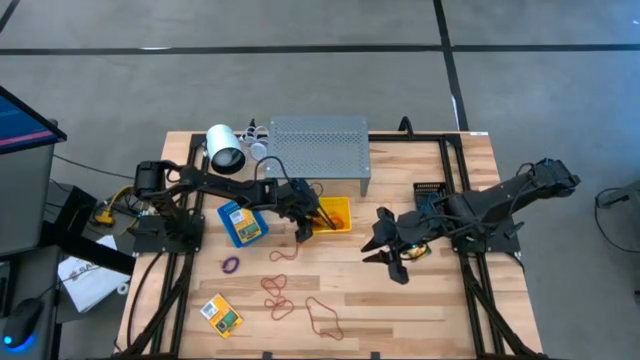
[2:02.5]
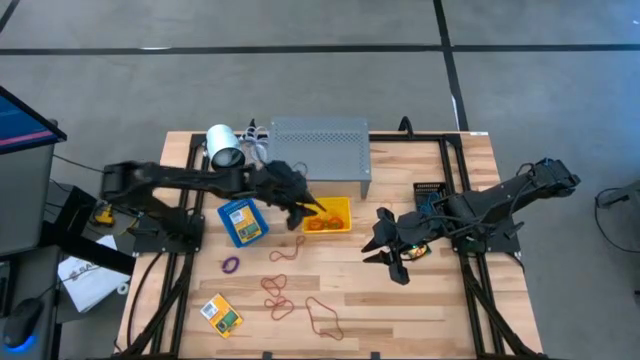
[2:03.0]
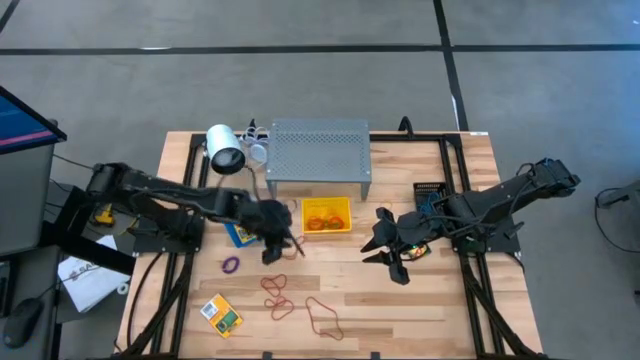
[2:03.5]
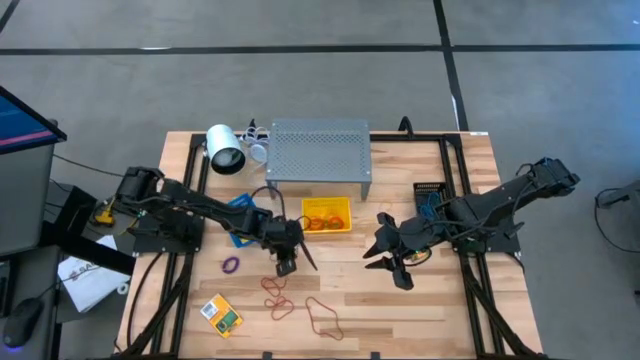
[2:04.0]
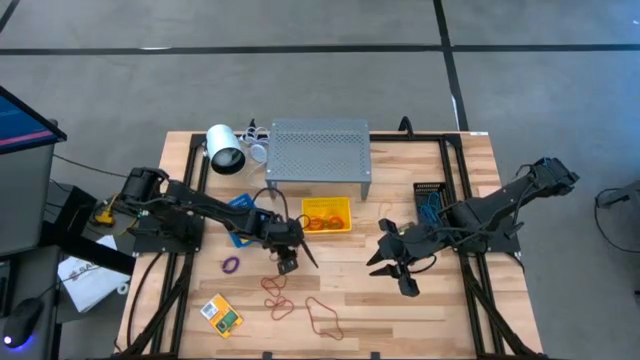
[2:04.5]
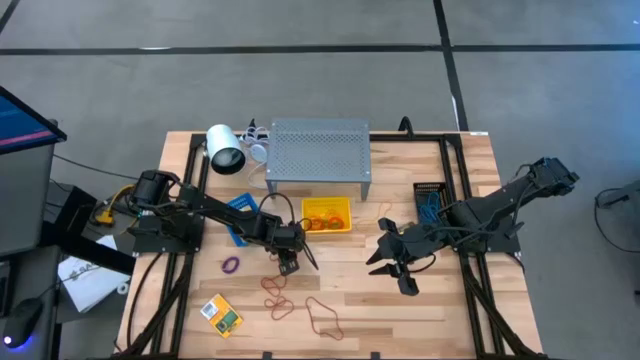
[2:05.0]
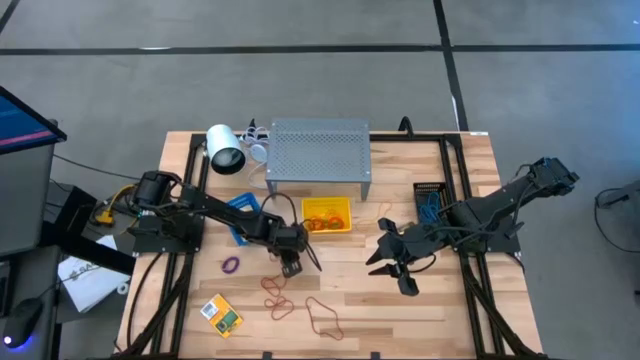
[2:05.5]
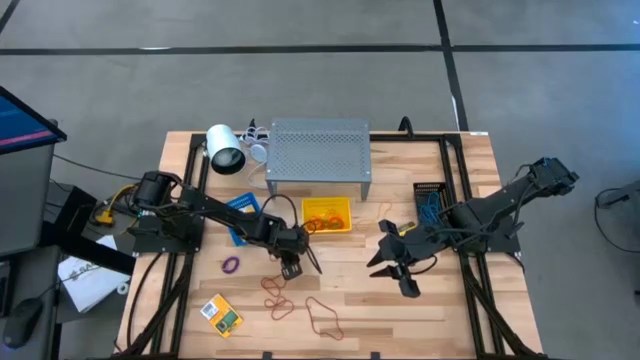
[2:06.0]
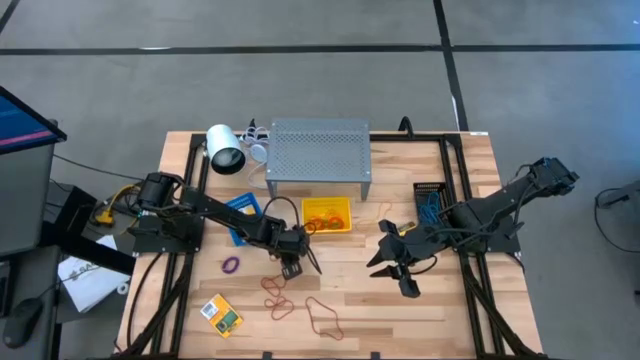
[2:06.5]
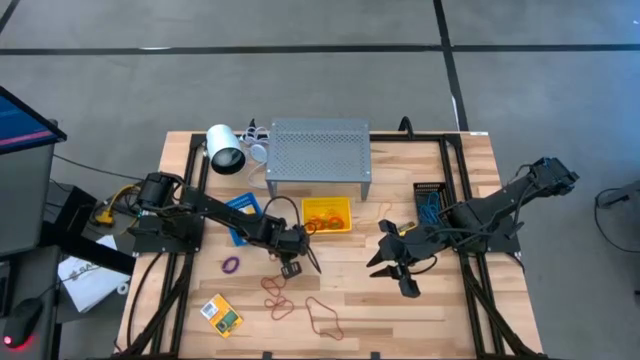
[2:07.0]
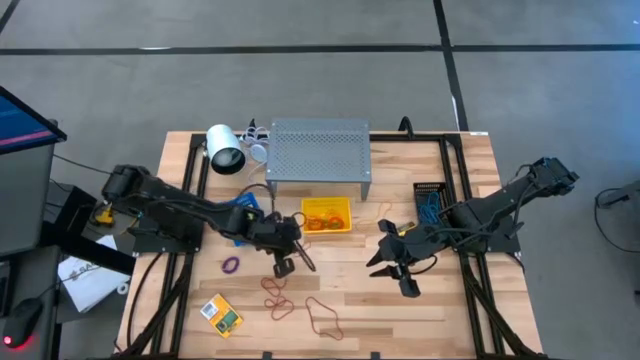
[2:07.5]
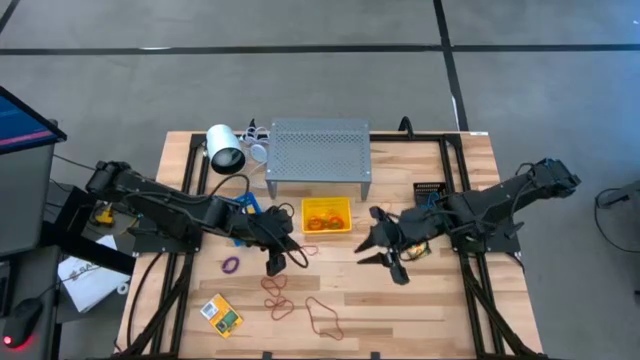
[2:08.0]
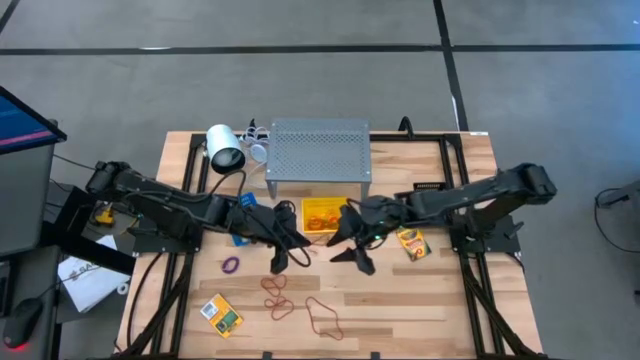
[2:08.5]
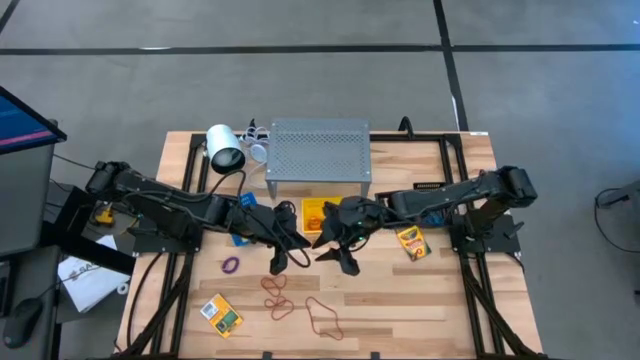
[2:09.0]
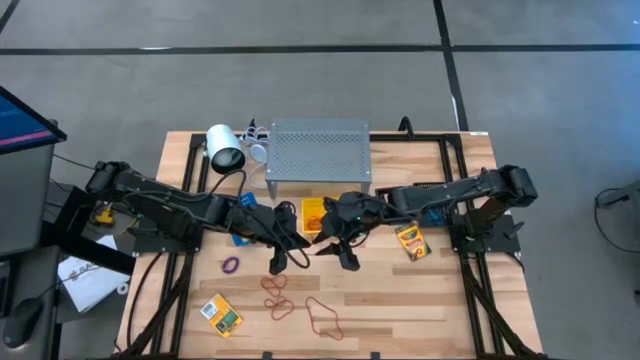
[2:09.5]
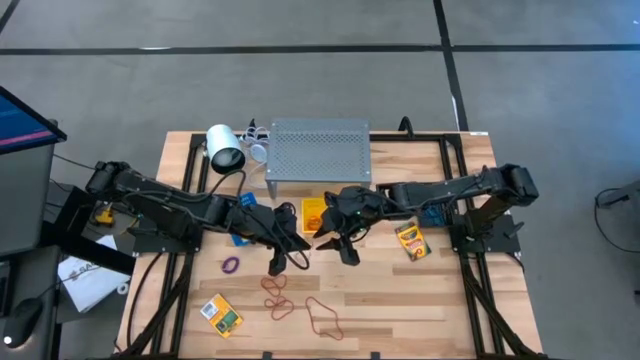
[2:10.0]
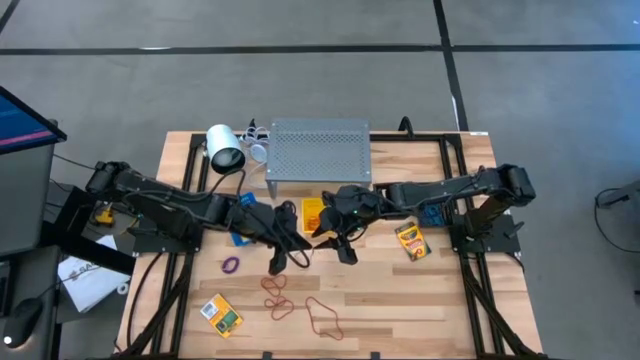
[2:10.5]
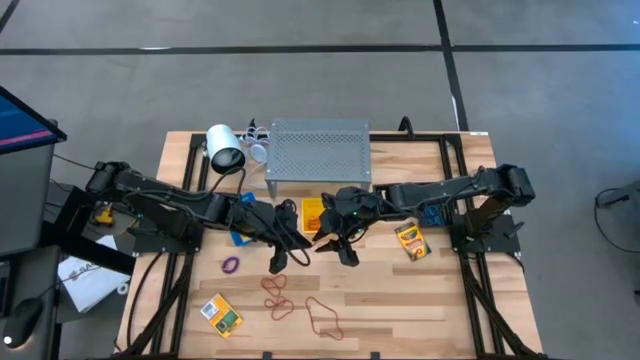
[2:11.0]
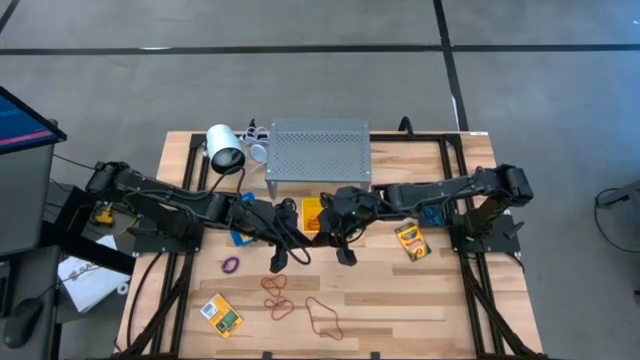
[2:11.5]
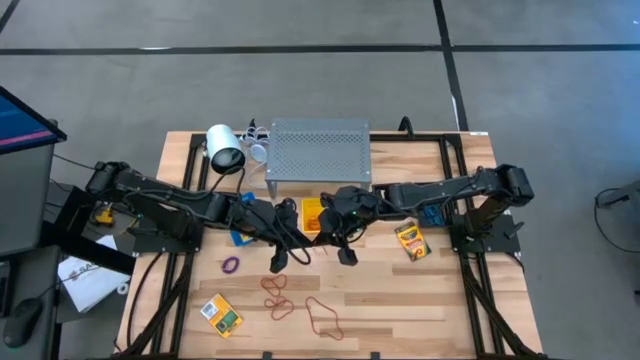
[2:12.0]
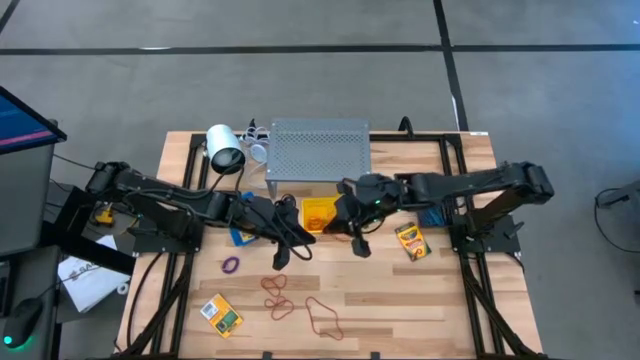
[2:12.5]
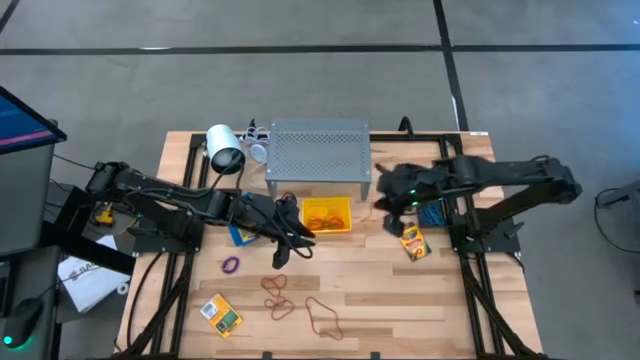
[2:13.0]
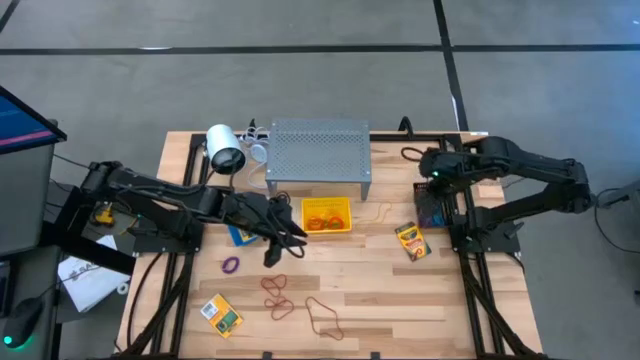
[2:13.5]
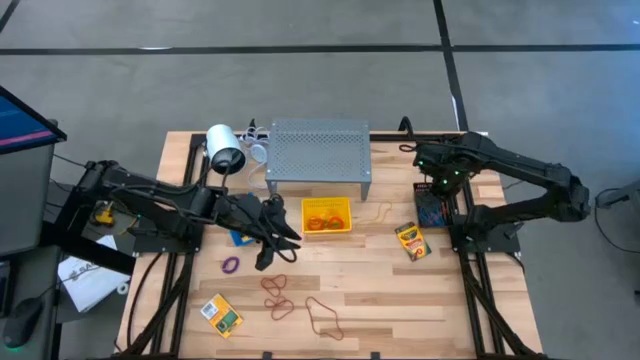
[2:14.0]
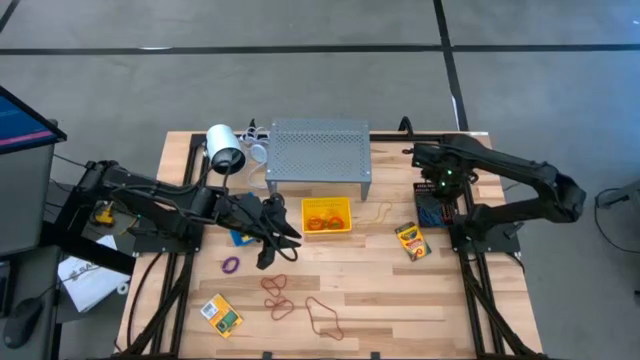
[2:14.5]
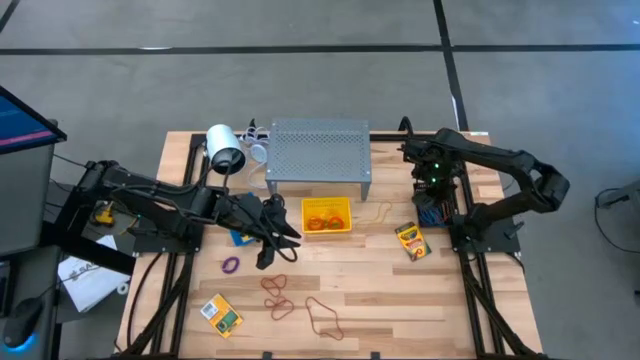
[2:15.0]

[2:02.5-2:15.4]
Task: Pick & Place Office Desk Supplies
Put the red rubber band into the black bin

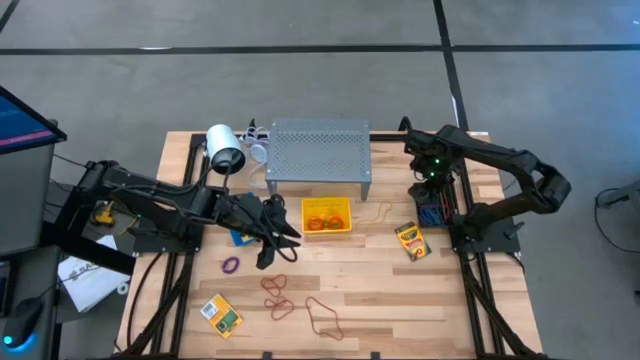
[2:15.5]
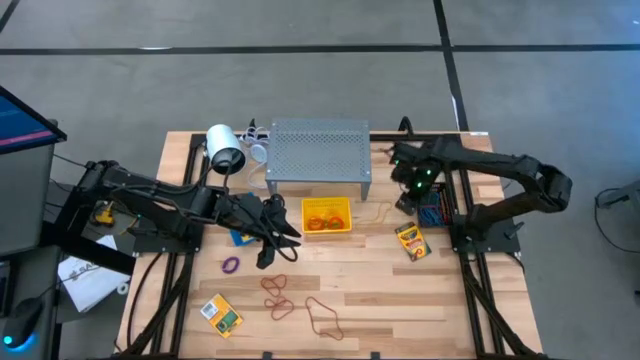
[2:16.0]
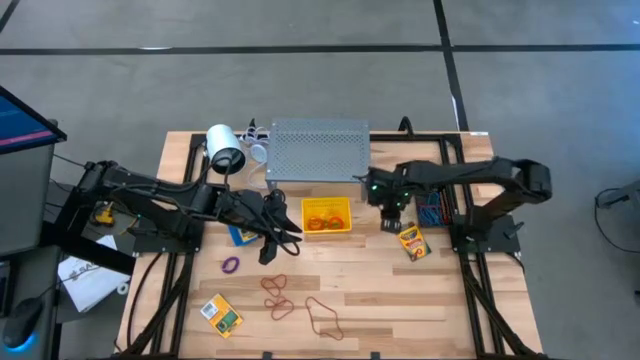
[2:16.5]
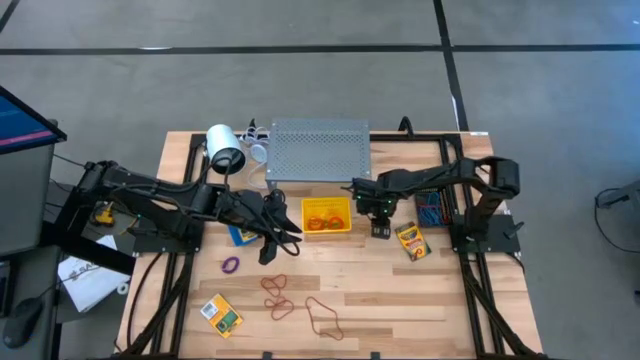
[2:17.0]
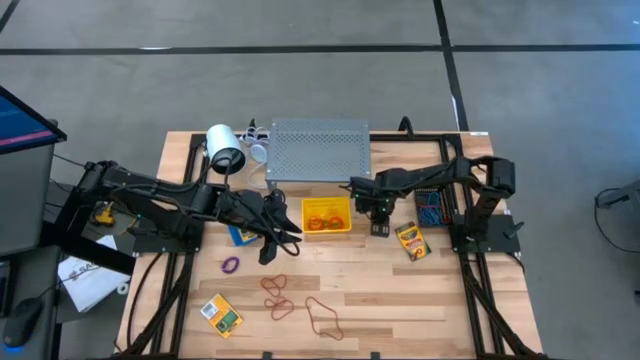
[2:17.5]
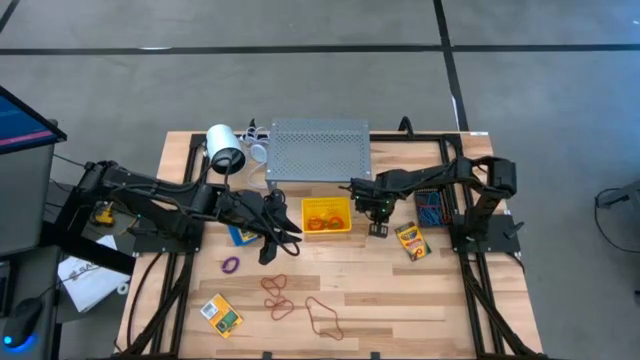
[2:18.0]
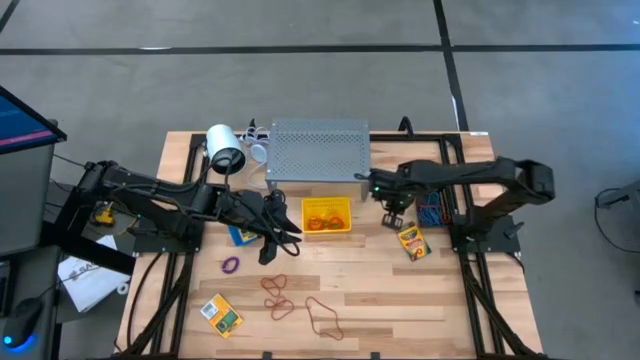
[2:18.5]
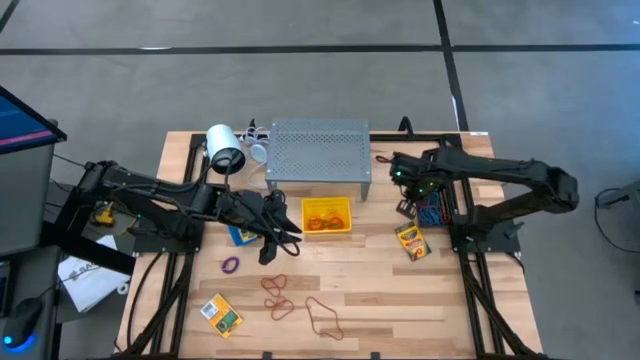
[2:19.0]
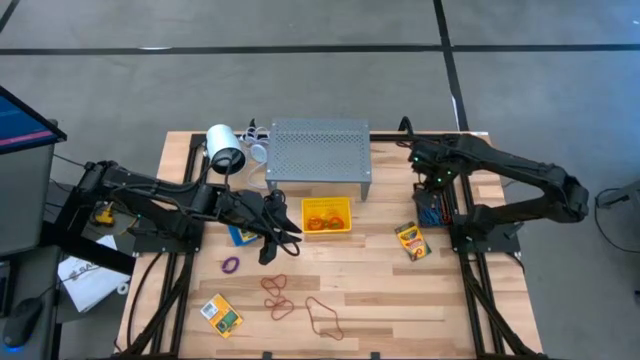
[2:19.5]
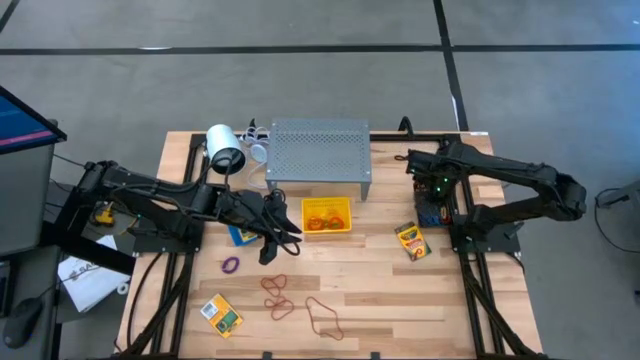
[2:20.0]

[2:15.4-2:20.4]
Put the yellow rubber band into the black bin

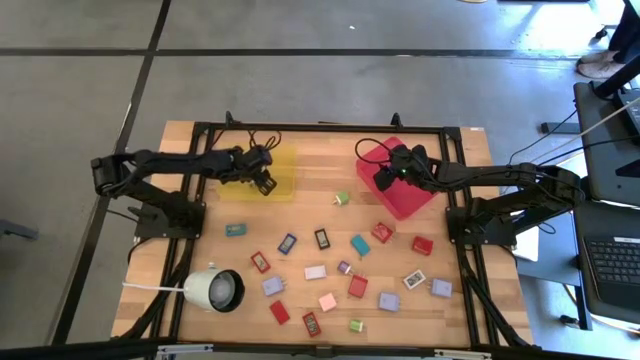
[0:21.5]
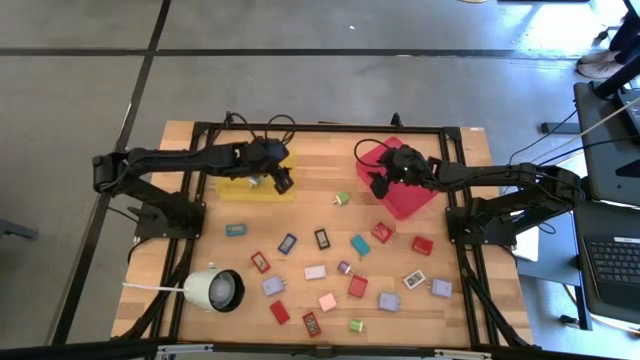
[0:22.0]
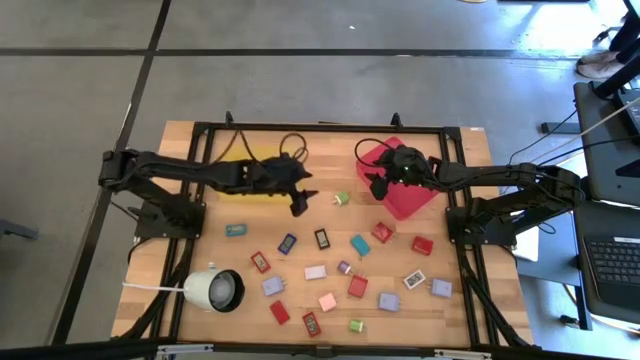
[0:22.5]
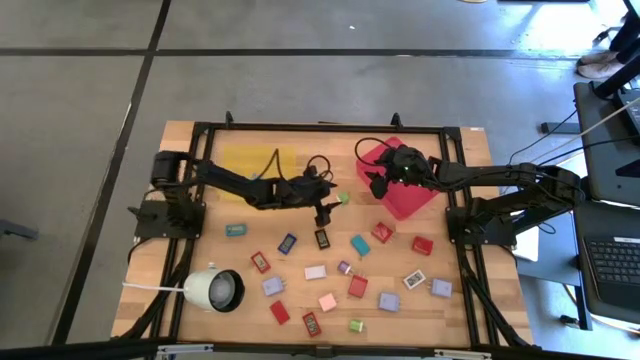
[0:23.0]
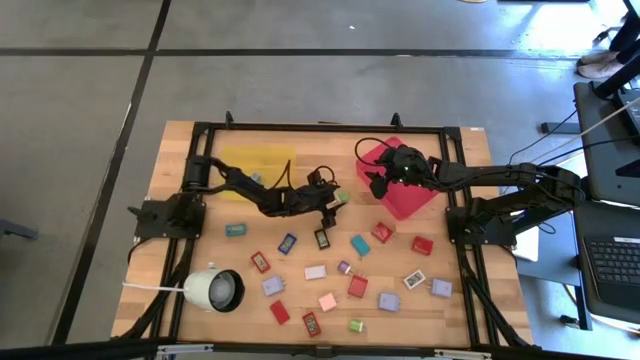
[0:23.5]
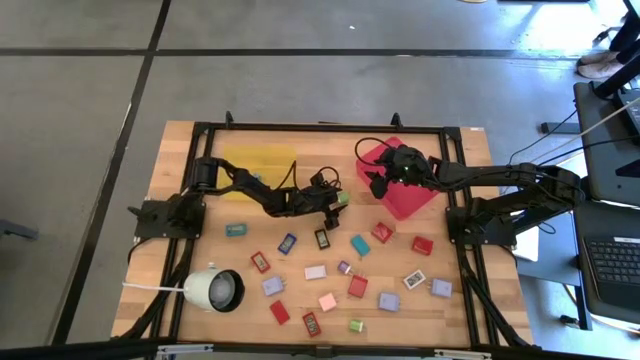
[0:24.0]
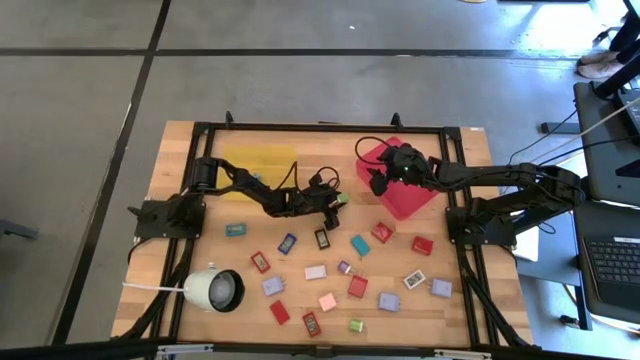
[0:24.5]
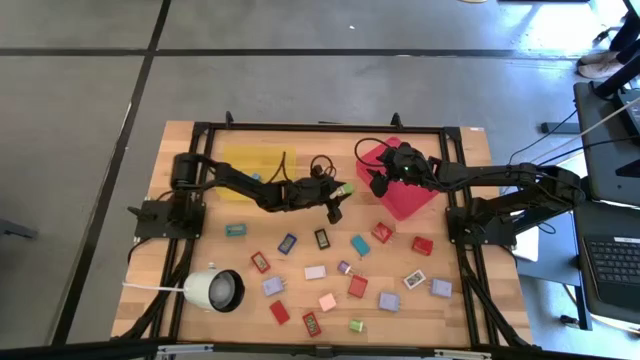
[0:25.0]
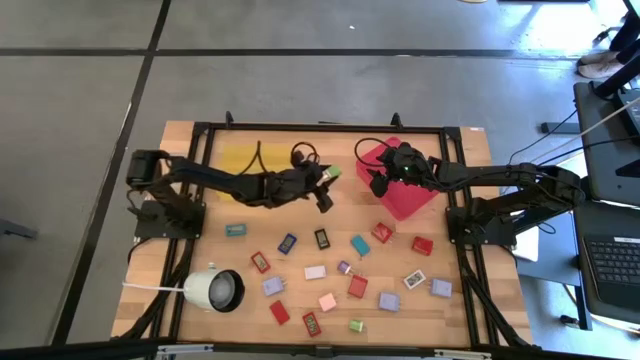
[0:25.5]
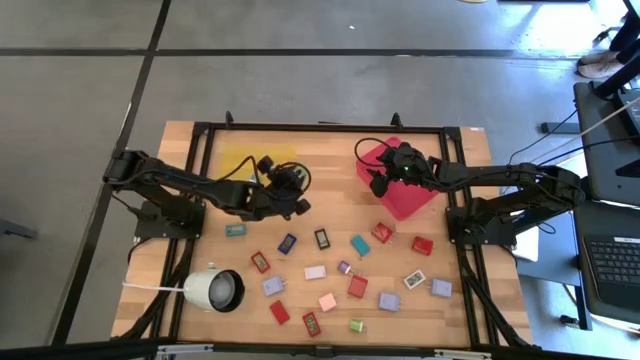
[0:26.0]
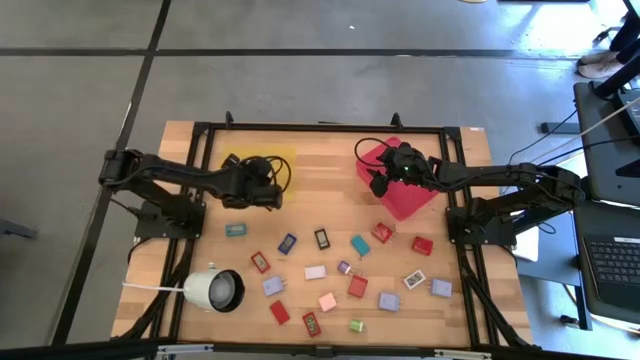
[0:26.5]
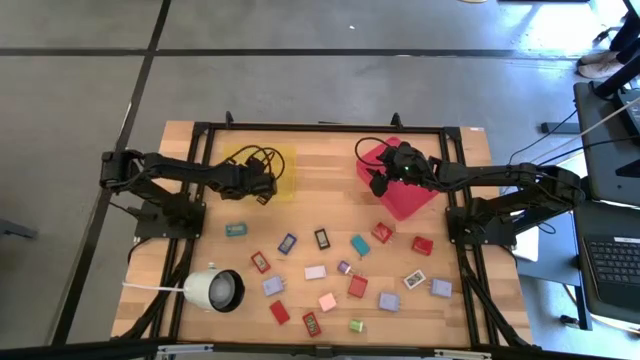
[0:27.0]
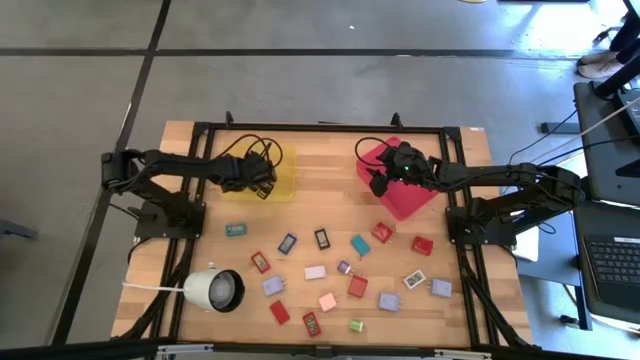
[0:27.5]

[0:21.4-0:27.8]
Task: Pick & Place Office items
Put the top green charger adapter into the yellow bin
